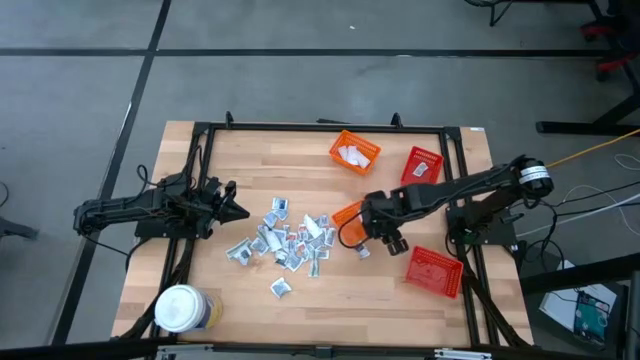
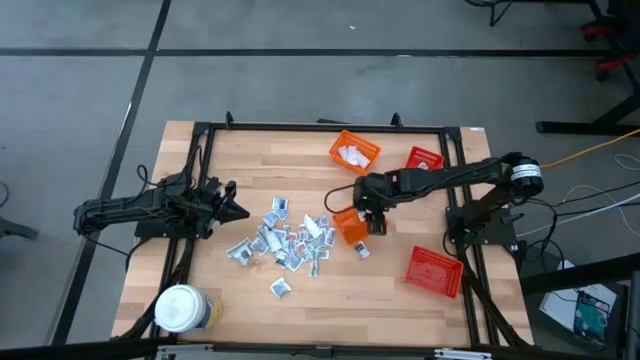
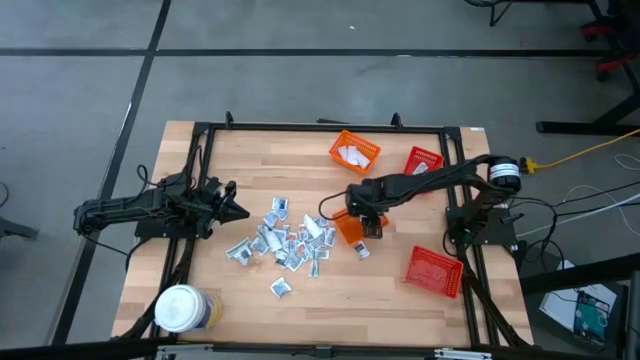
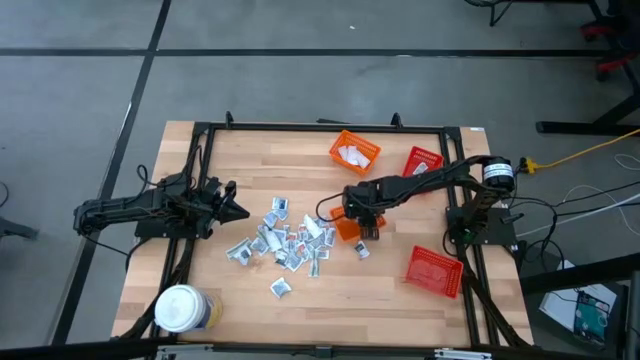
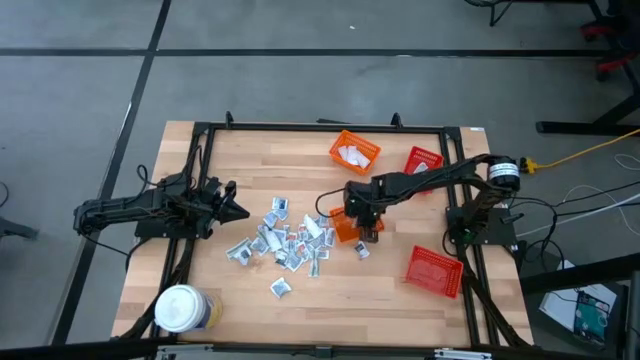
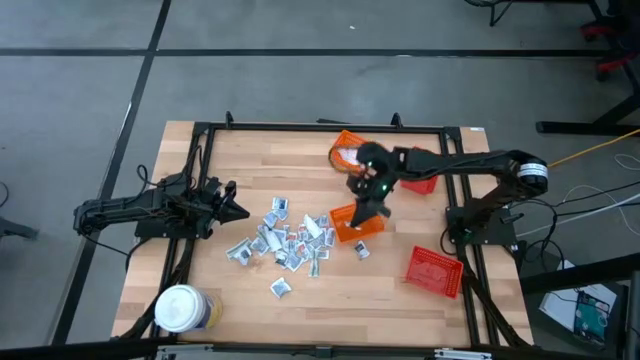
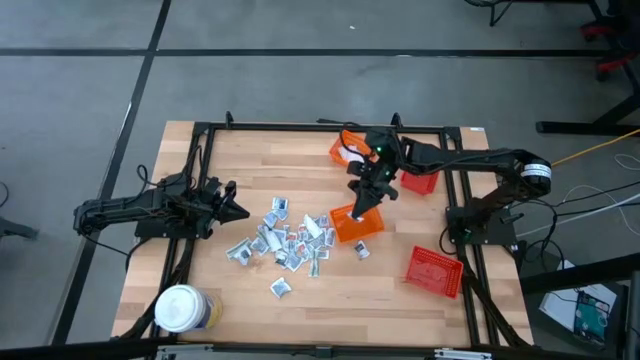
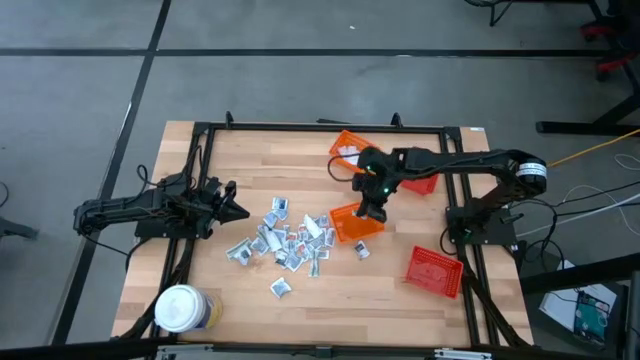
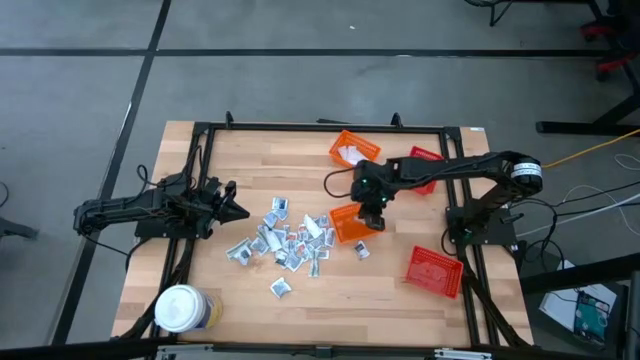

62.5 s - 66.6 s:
Task: Pick & Place First Aid Supplies
Adjust the blue alcohol pad in the orange bin

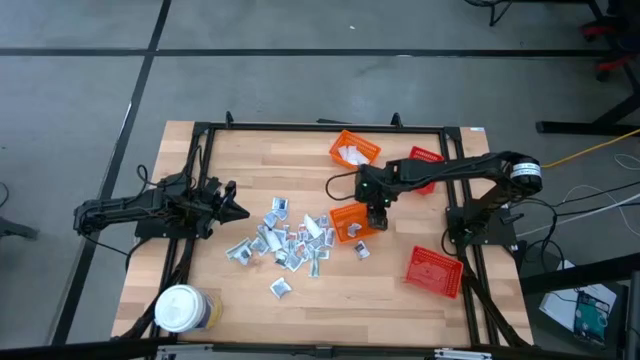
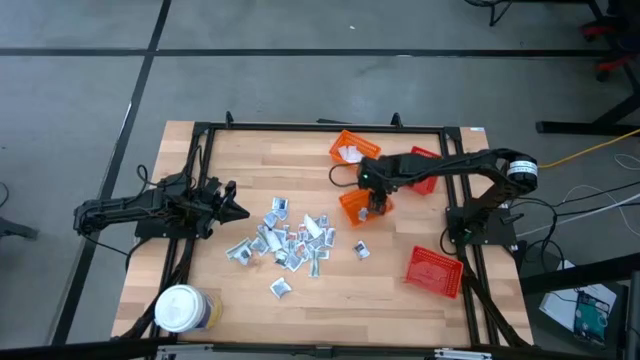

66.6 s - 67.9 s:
Adjust the bottom orange bin

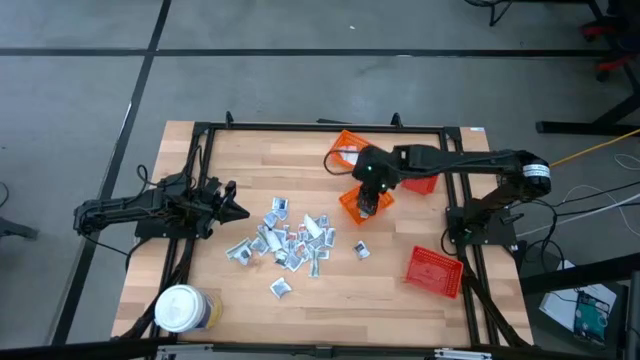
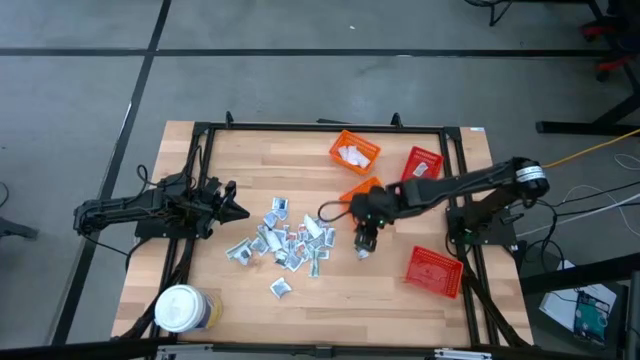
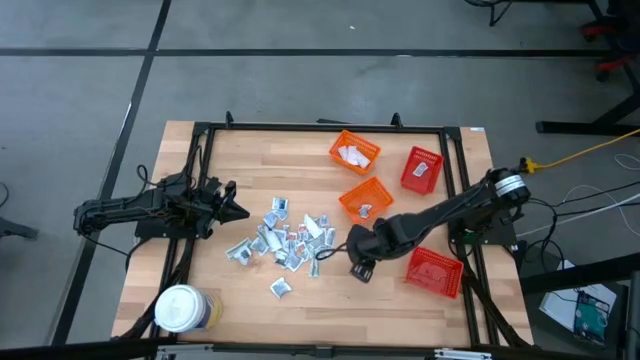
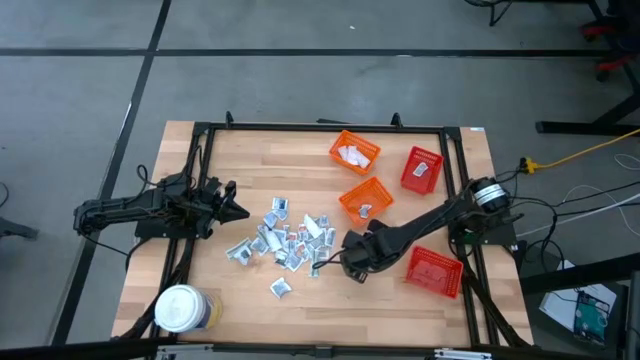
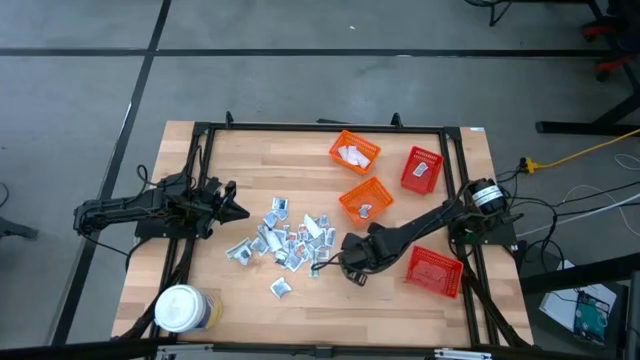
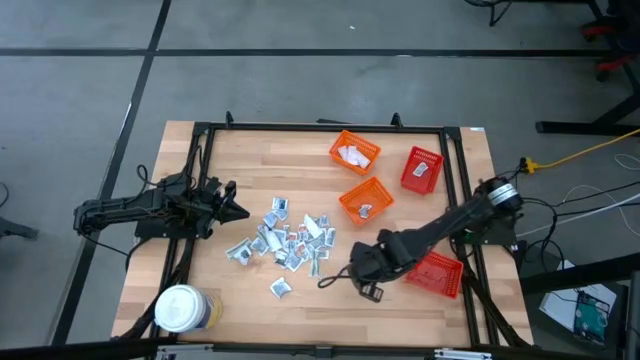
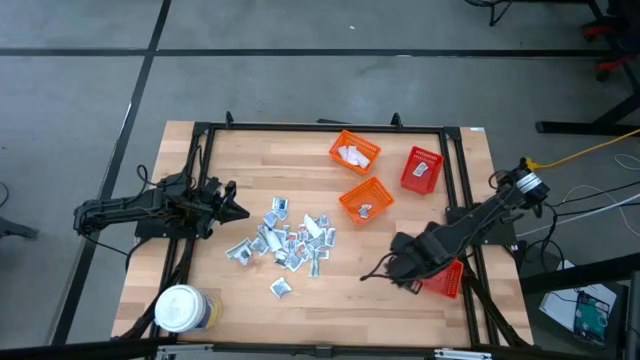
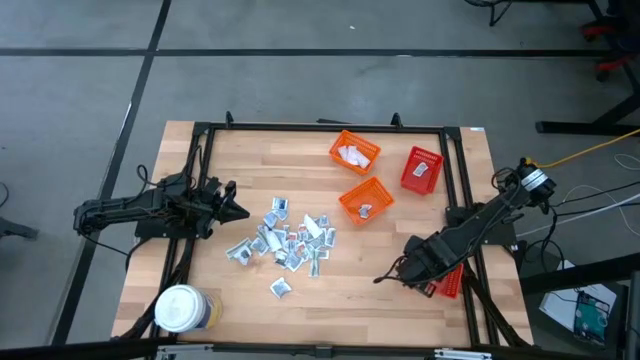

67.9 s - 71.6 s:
Put the gray towelette pack into the bottom red bin

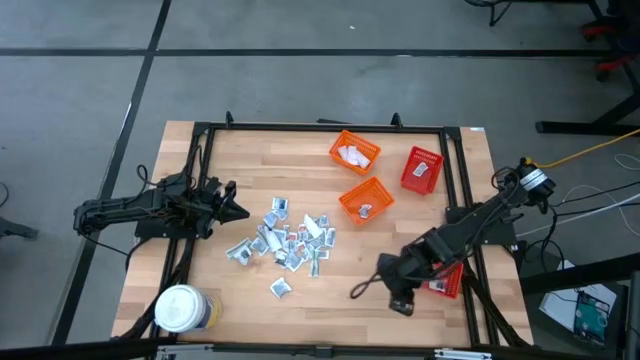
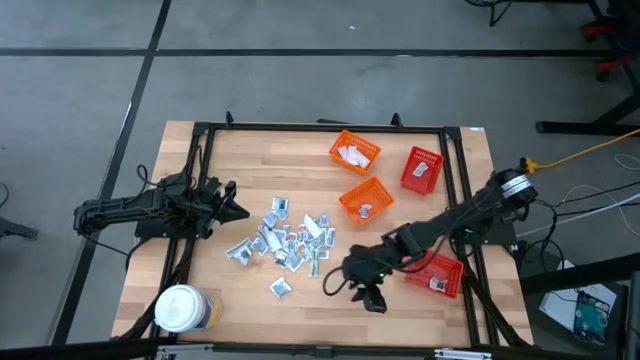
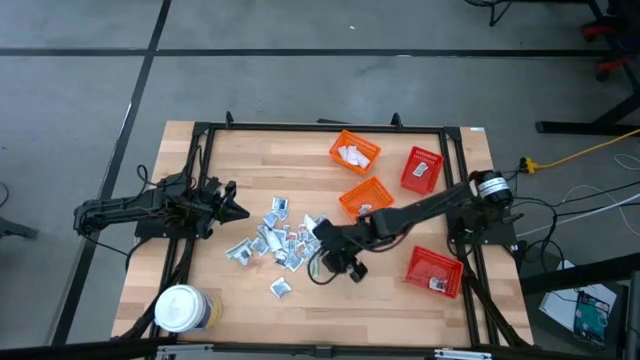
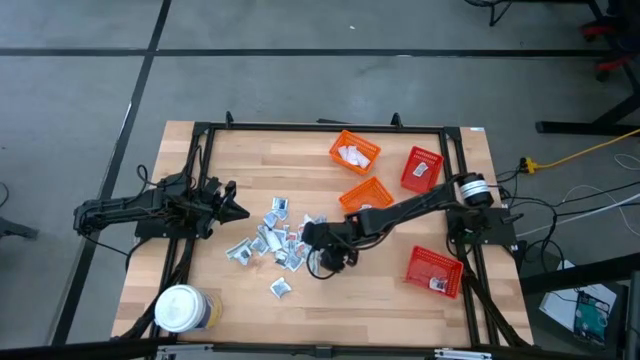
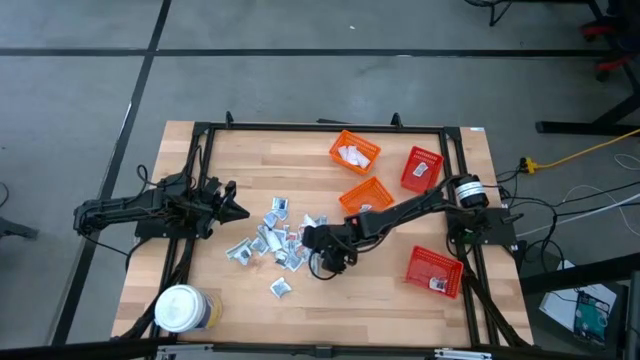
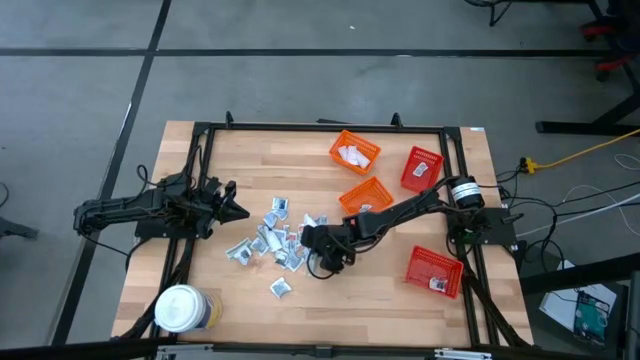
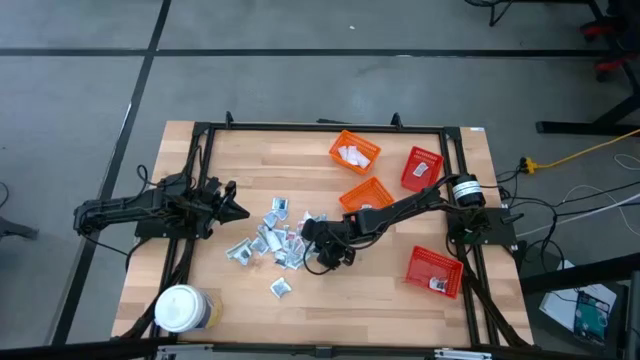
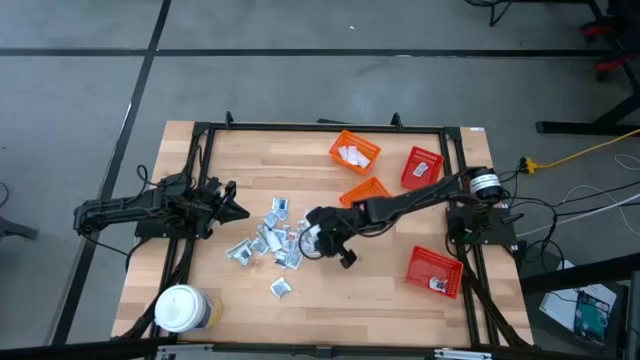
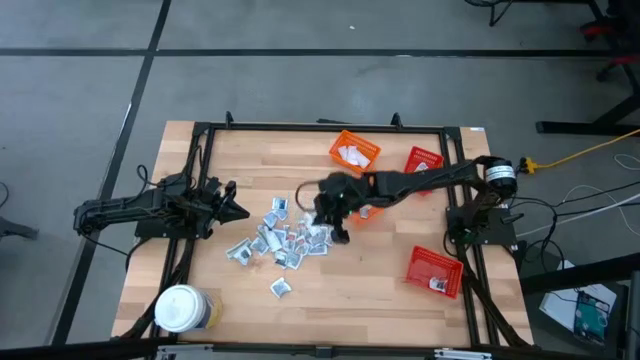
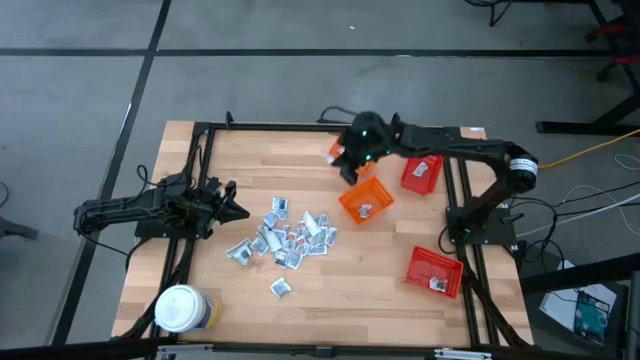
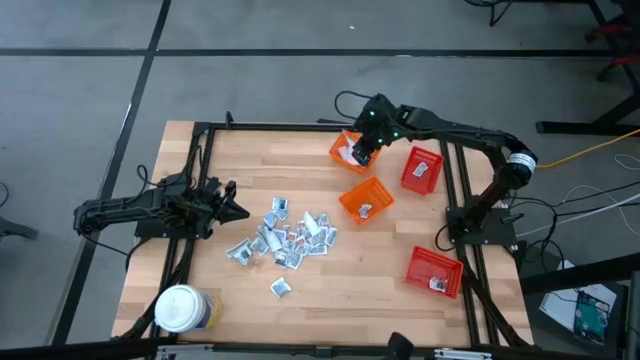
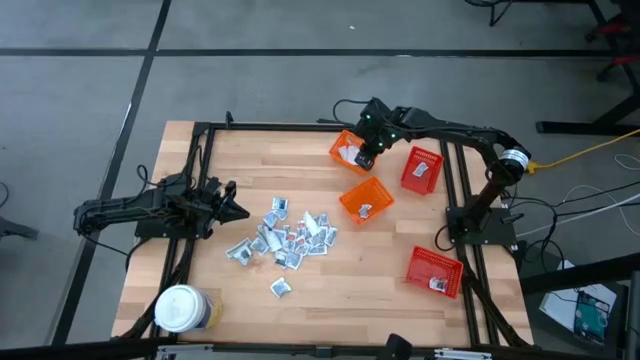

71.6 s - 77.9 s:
Put the green bandage pack into the top orange bin

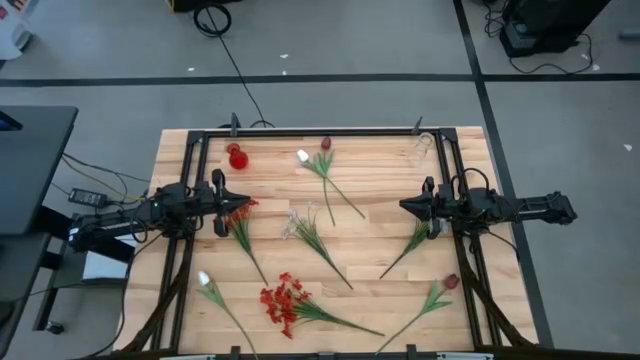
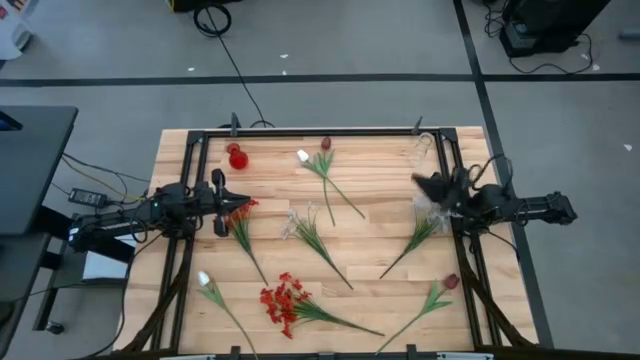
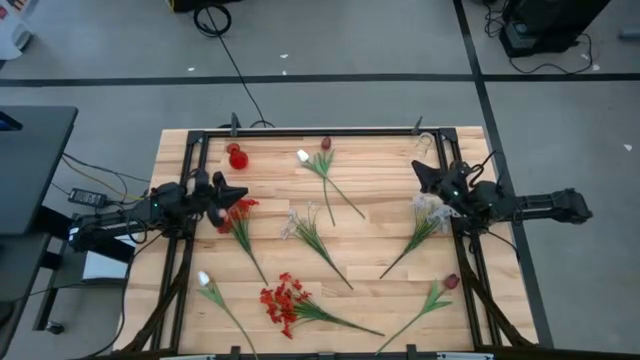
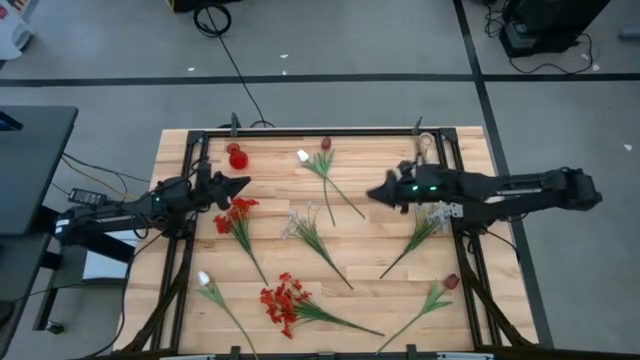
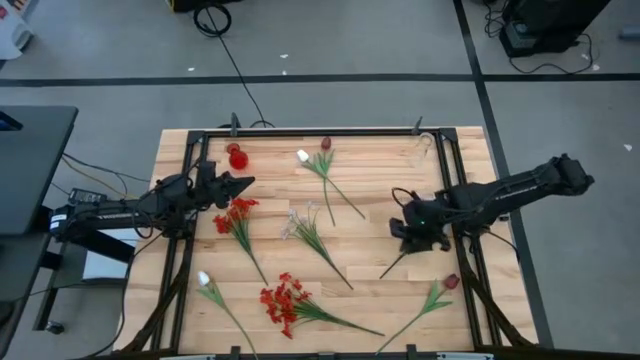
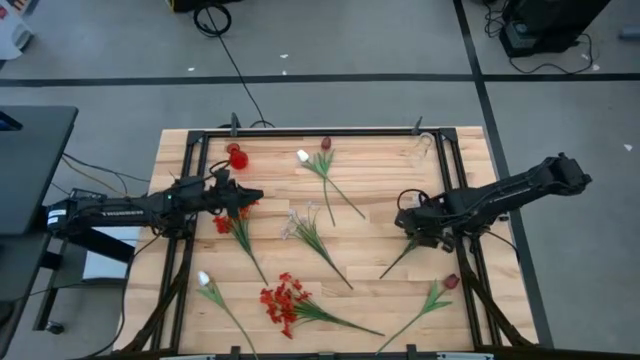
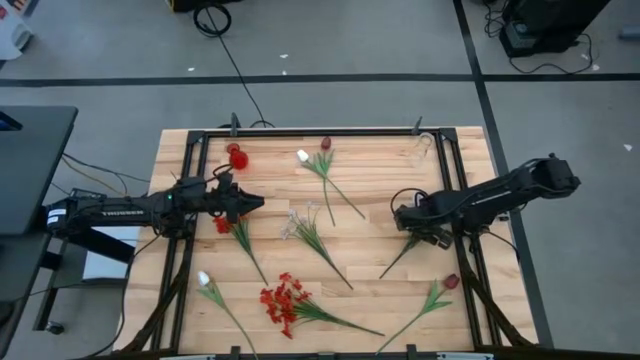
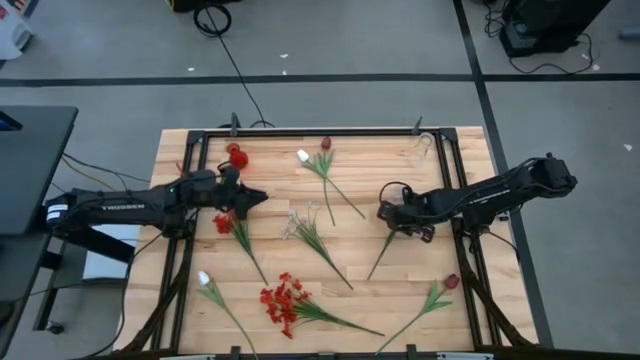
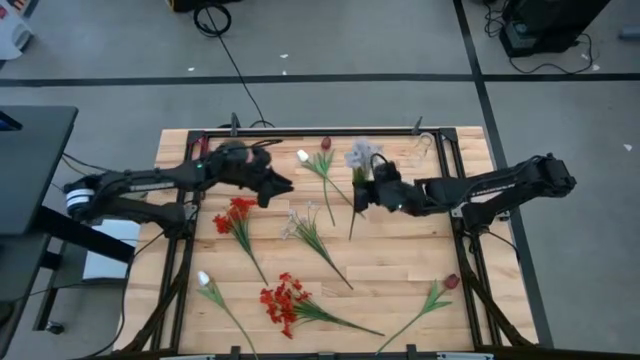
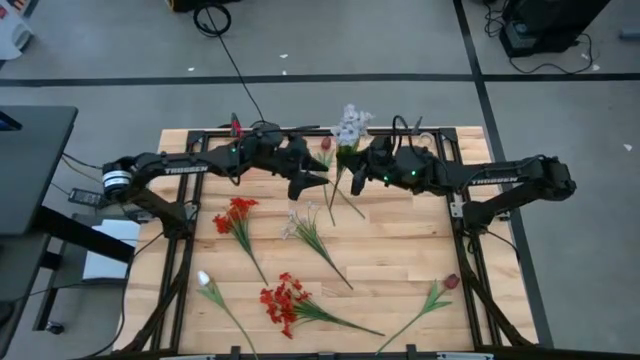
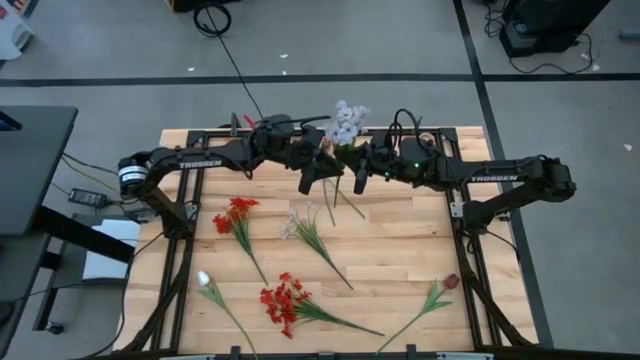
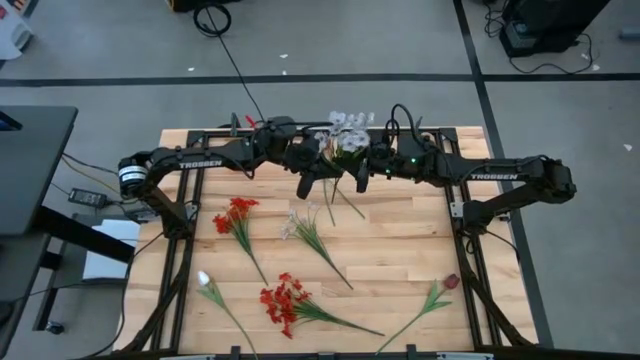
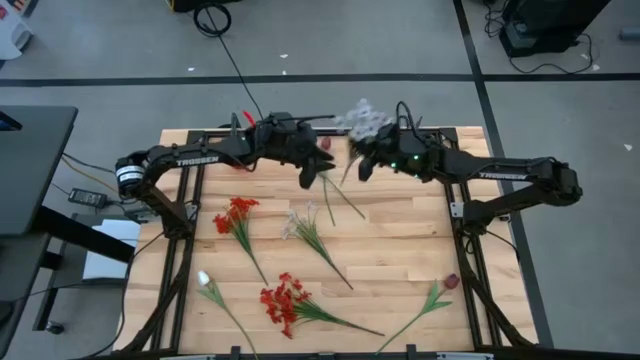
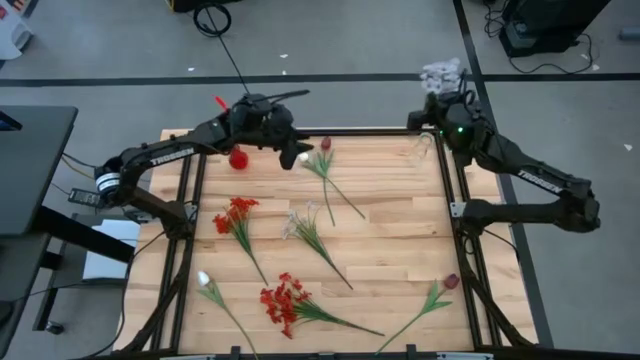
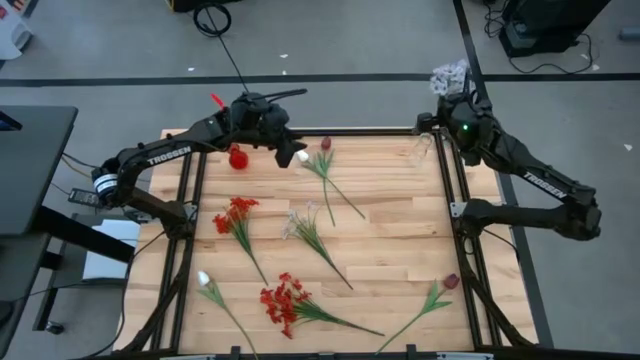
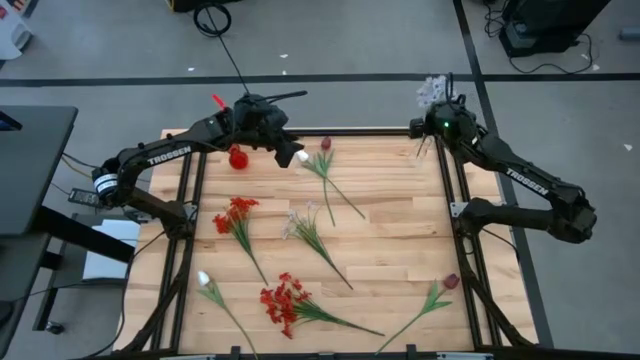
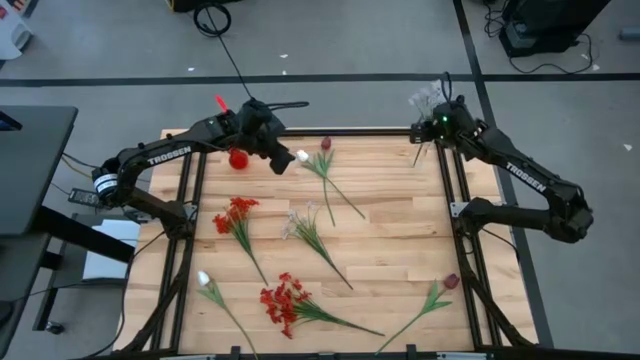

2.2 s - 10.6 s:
Task: Sort flowers into vase by color
Put the right white flowers into the transparent vase
